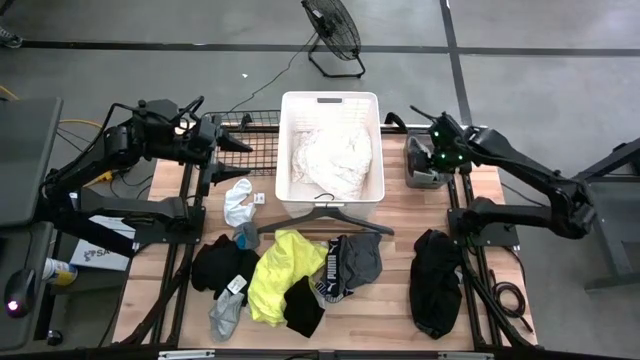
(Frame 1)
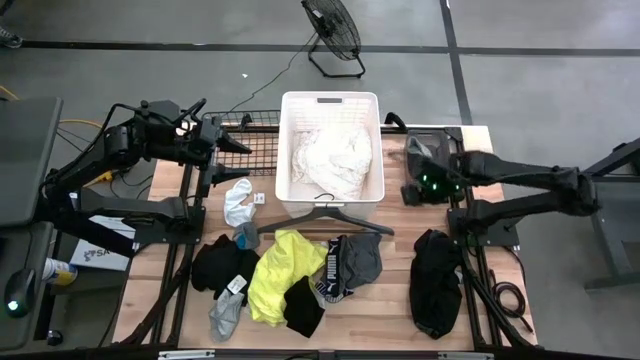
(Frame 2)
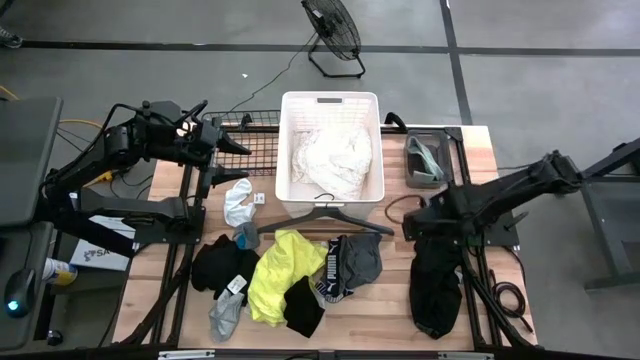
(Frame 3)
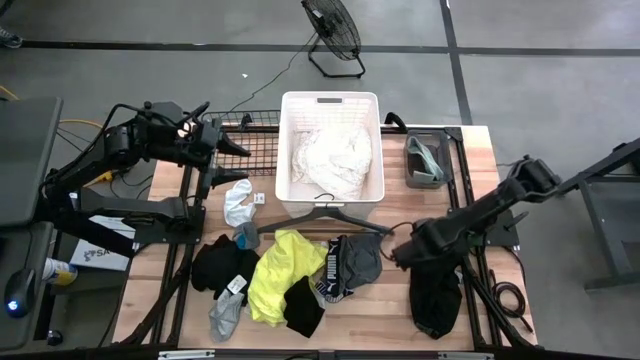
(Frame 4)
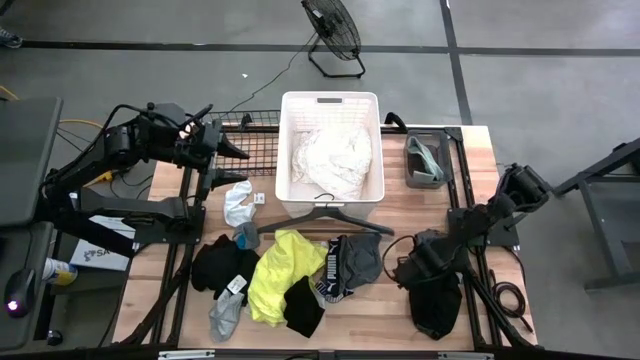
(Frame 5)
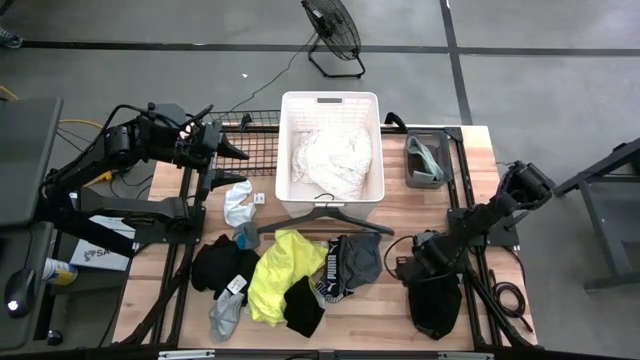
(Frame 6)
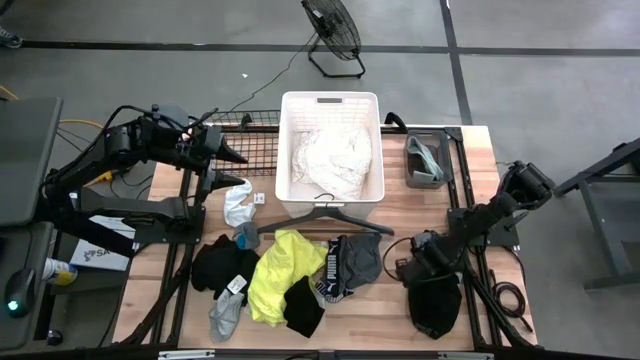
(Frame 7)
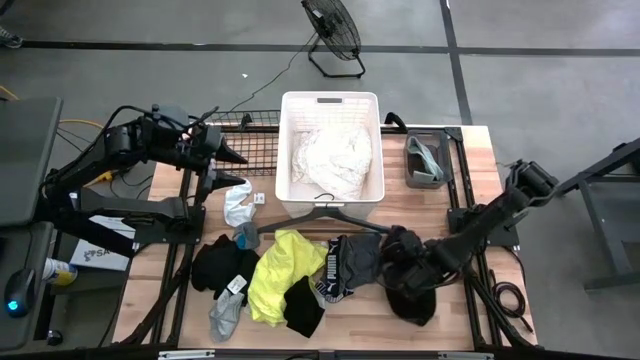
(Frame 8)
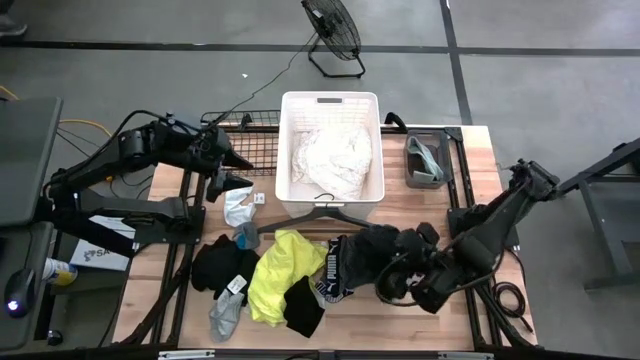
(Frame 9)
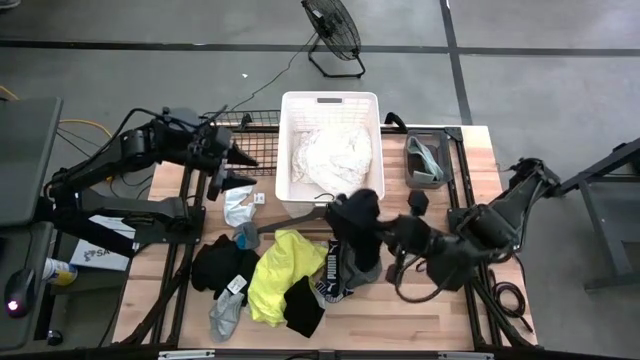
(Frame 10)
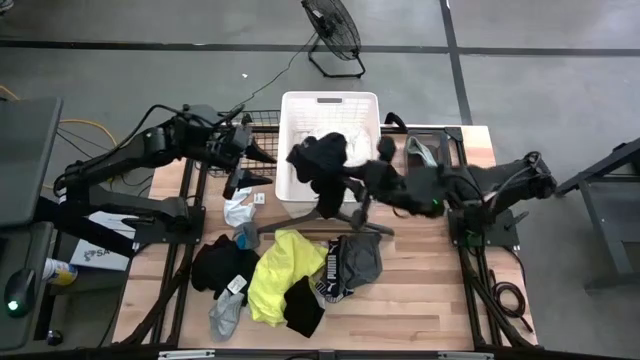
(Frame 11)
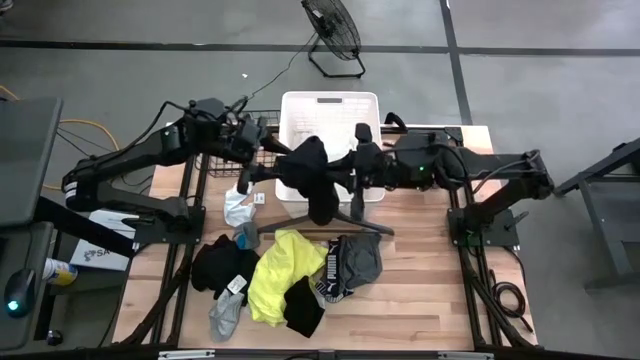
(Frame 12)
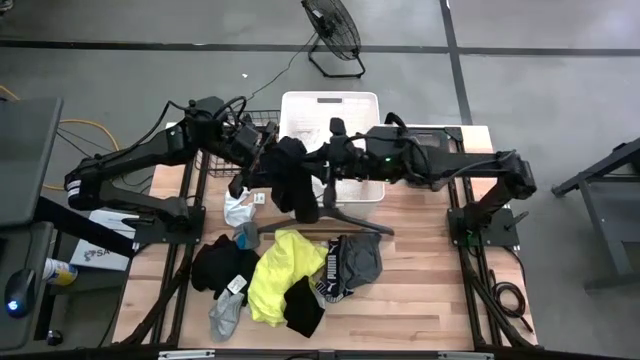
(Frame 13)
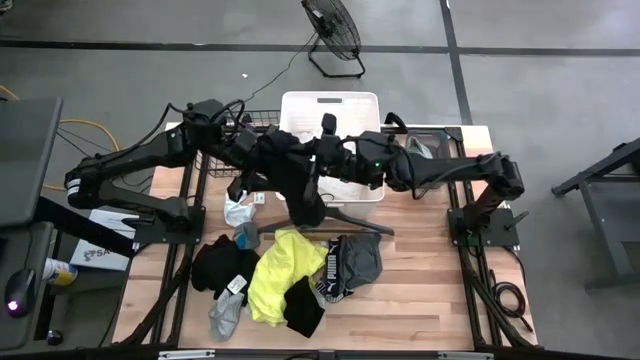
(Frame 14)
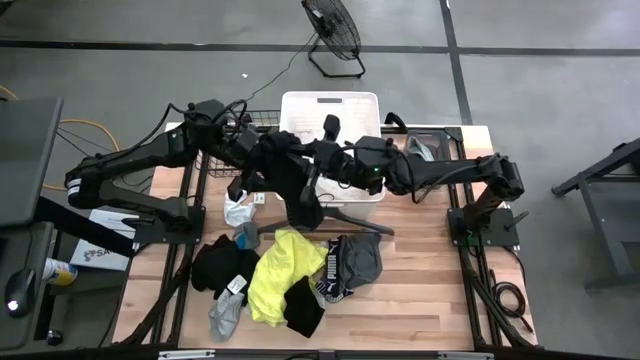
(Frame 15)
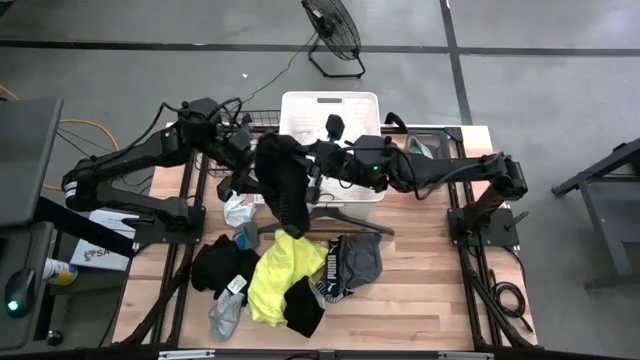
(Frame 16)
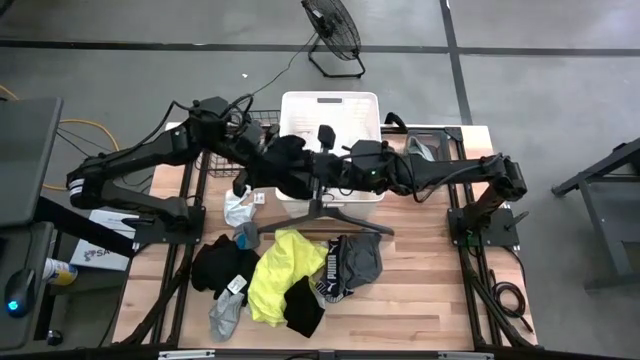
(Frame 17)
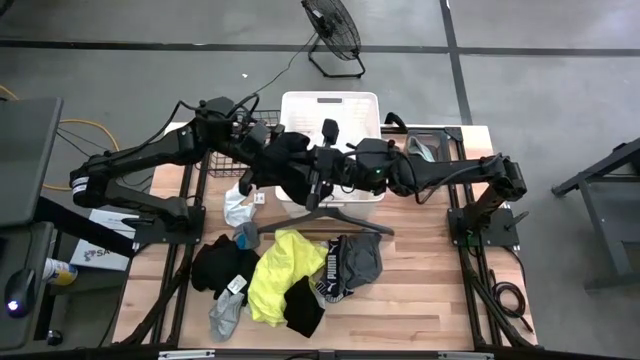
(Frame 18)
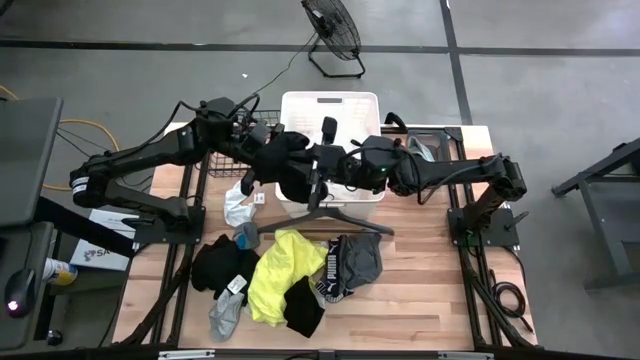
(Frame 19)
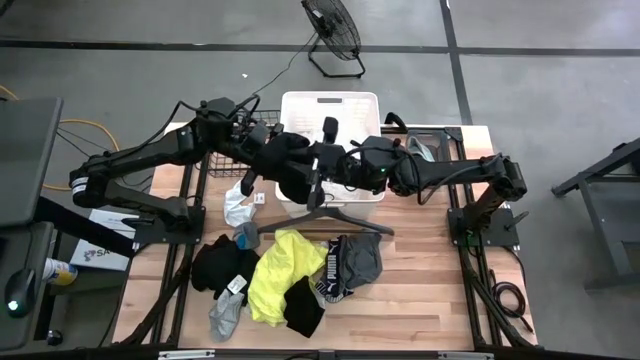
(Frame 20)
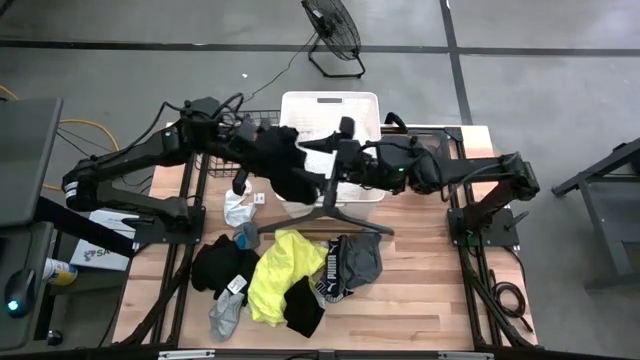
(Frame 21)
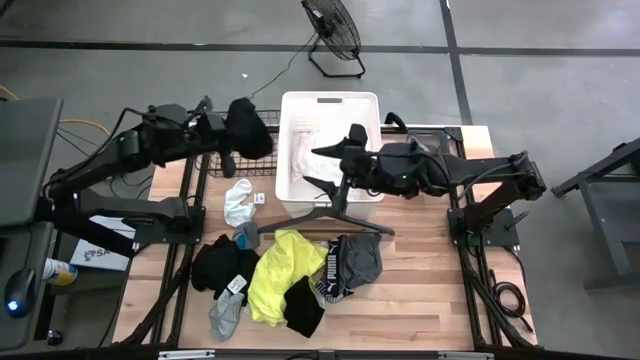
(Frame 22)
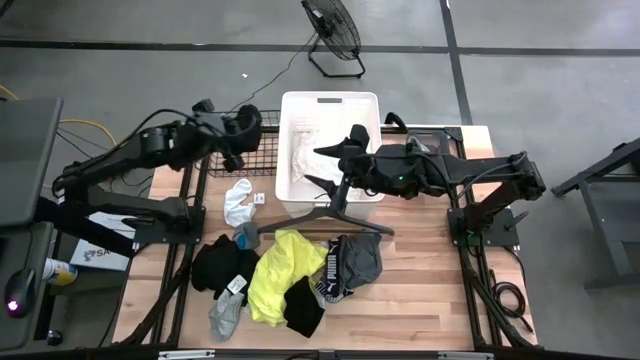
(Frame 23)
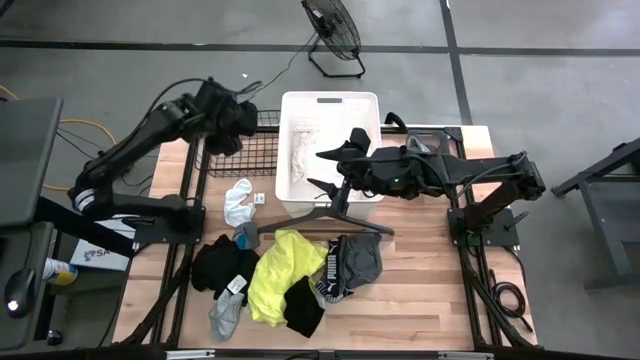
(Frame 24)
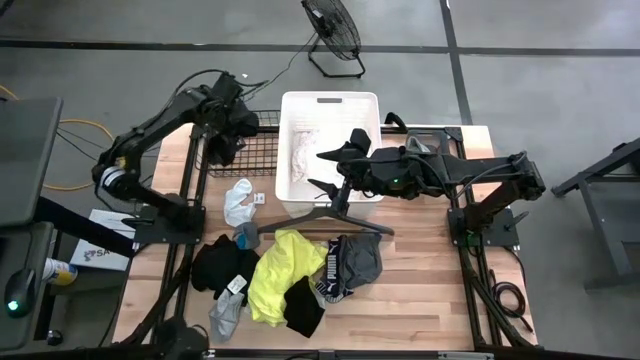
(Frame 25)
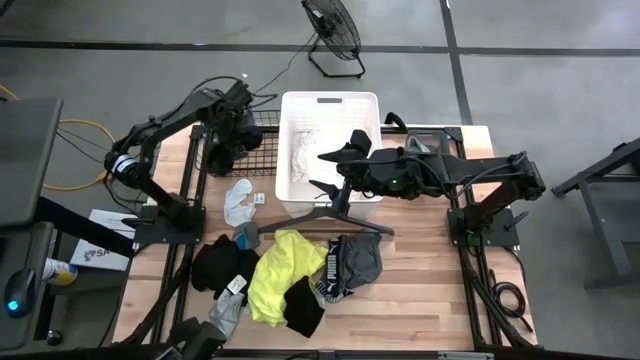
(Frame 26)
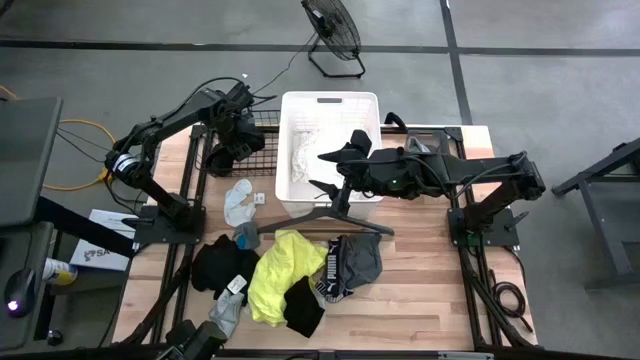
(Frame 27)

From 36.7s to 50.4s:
Task: Pick & Place Cloths
Put the right black underwear into the wire basket

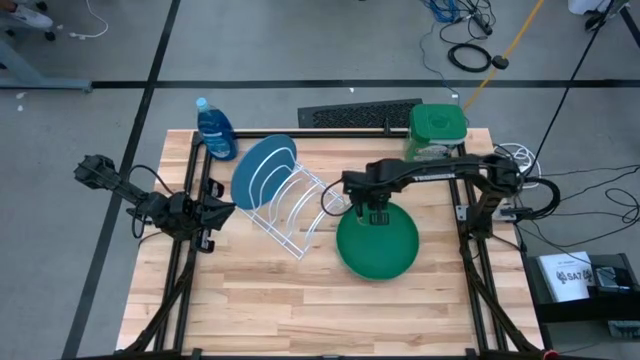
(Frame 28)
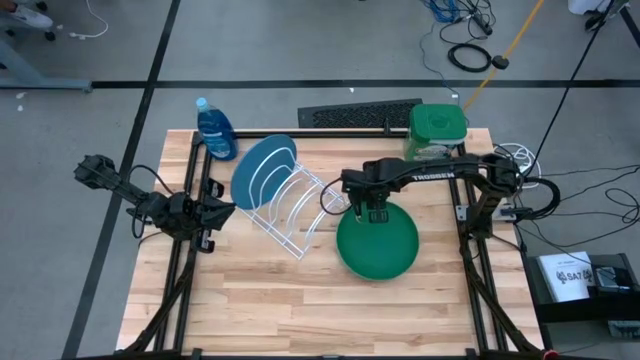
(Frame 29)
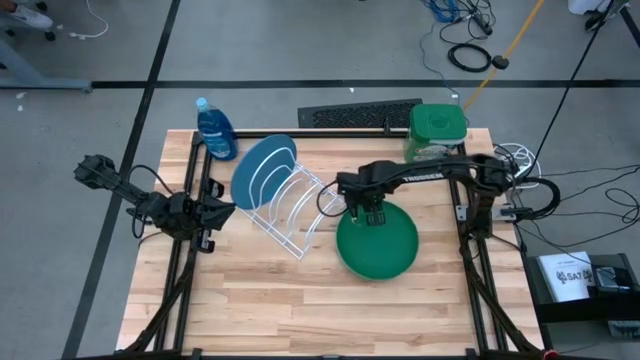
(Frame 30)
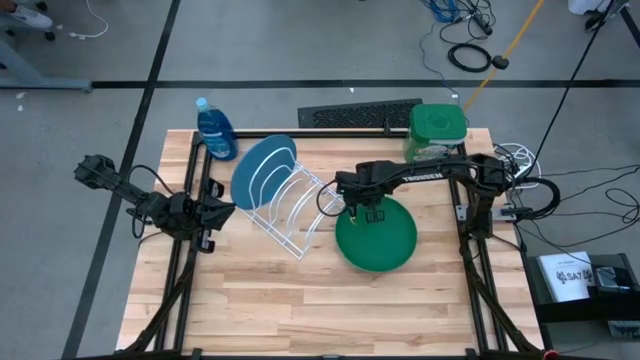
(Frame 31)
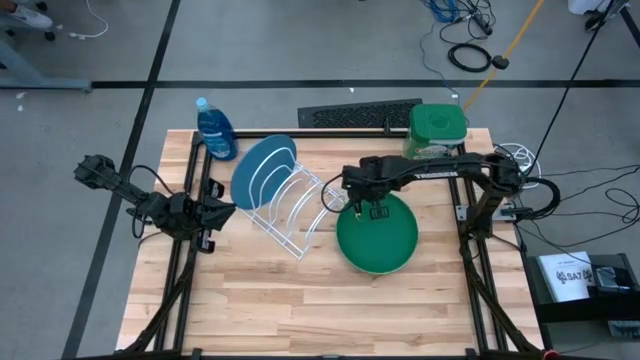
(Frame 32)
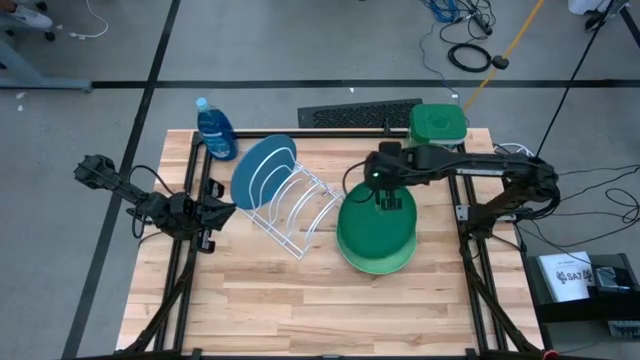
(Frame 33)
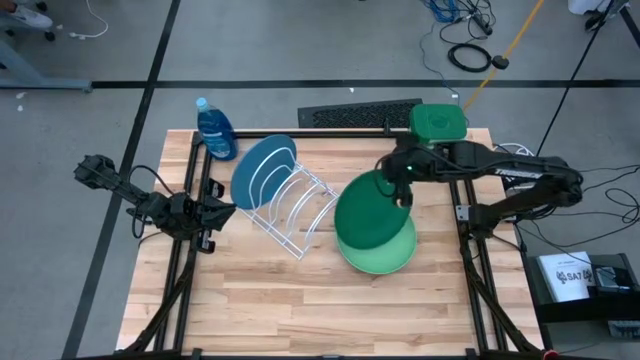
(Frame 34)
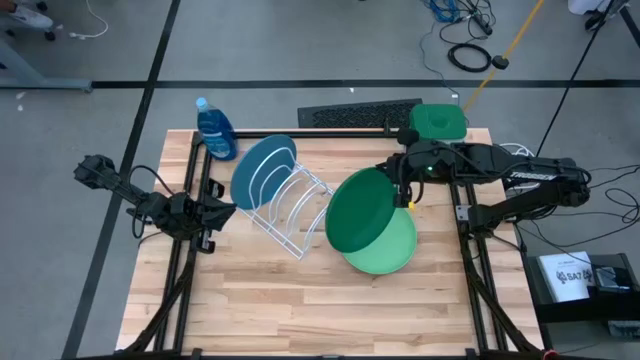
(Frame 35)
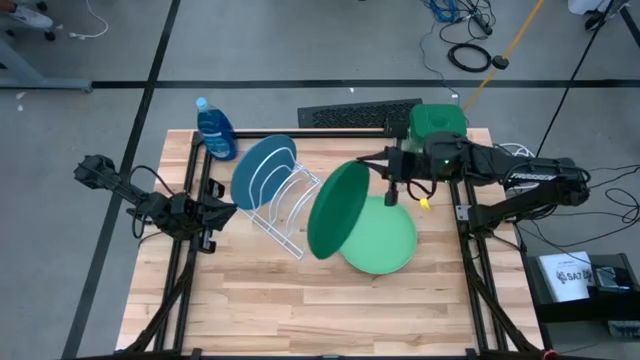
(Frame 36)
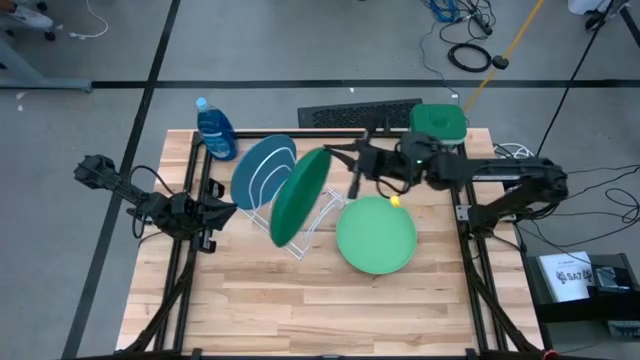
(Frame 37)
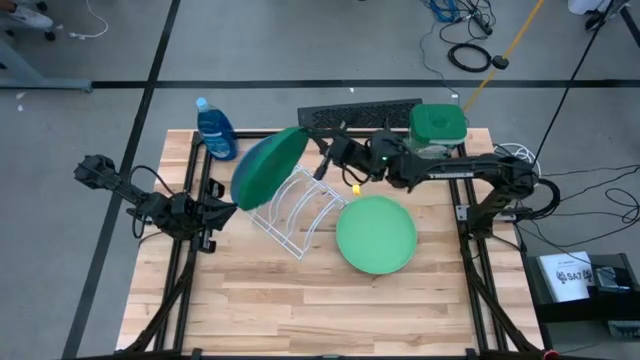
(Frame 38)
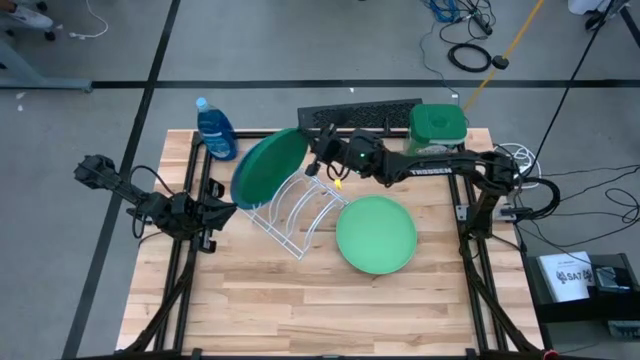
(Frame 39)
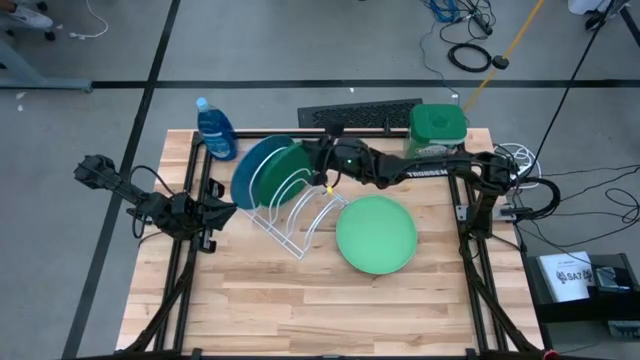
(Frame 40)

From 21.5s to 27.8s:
Task: Sort dishes
Put the green plate on the dish rack
